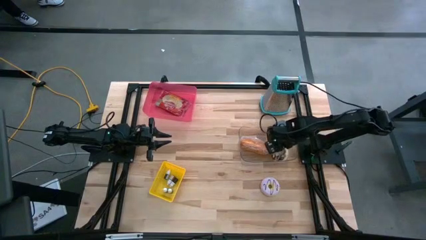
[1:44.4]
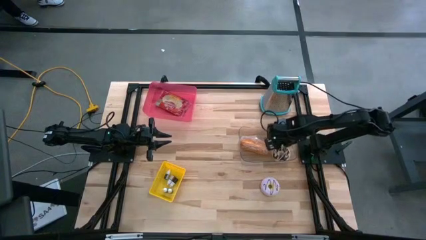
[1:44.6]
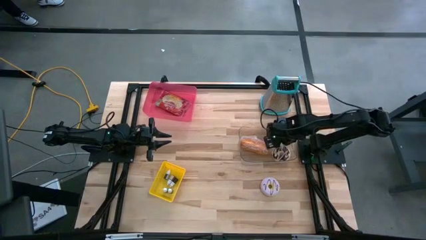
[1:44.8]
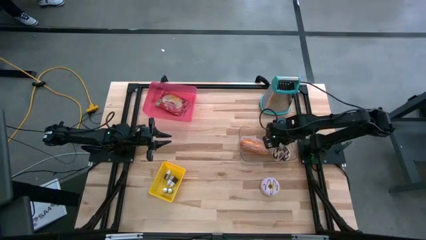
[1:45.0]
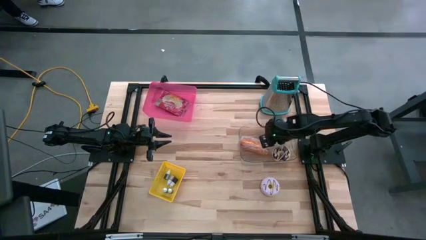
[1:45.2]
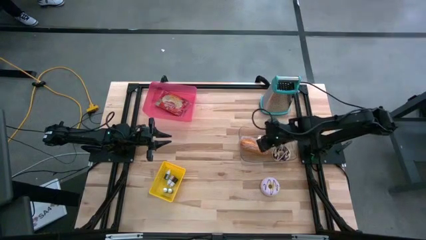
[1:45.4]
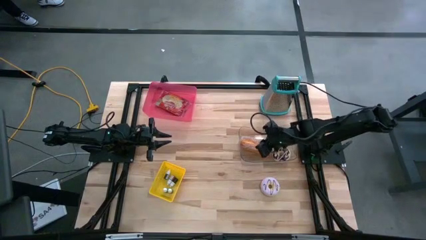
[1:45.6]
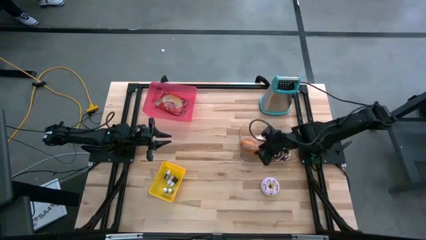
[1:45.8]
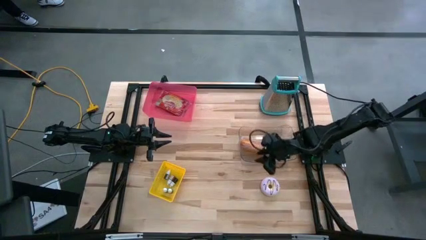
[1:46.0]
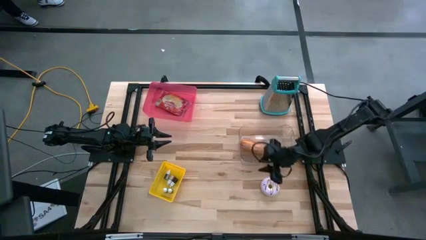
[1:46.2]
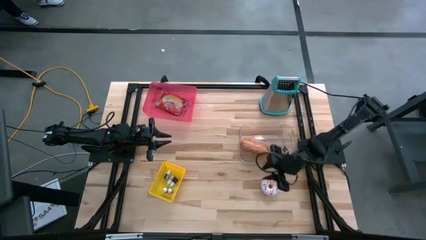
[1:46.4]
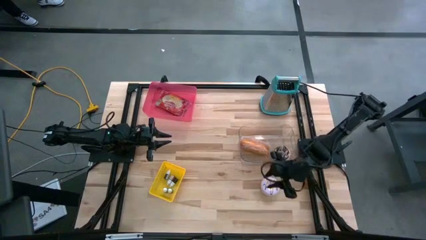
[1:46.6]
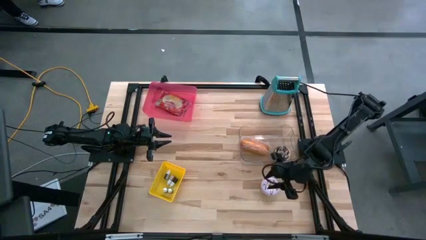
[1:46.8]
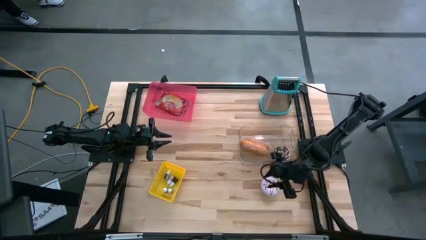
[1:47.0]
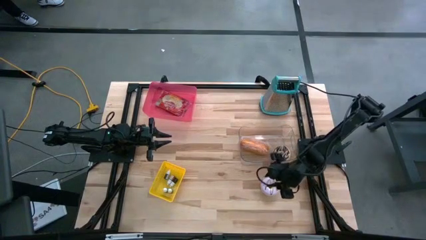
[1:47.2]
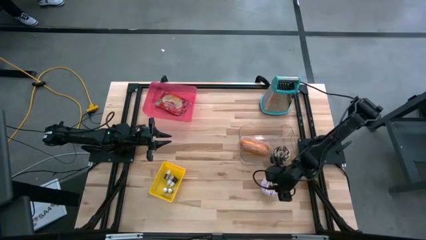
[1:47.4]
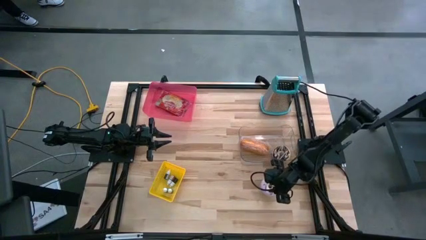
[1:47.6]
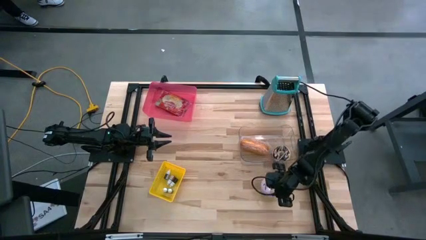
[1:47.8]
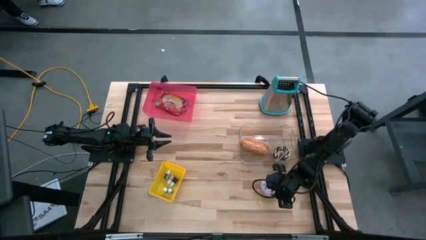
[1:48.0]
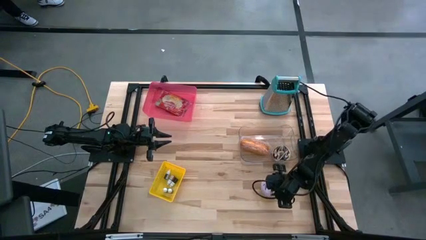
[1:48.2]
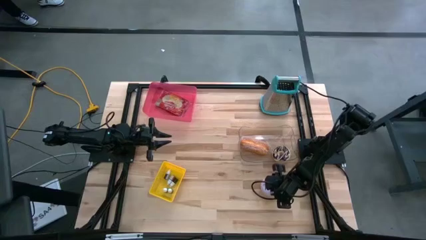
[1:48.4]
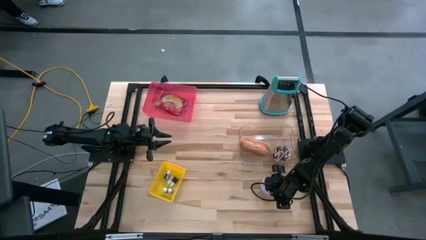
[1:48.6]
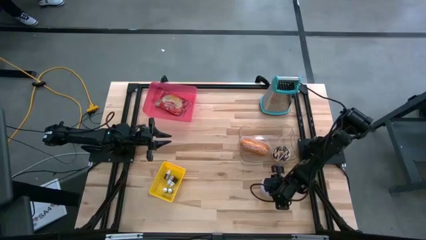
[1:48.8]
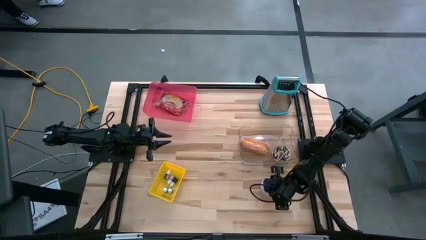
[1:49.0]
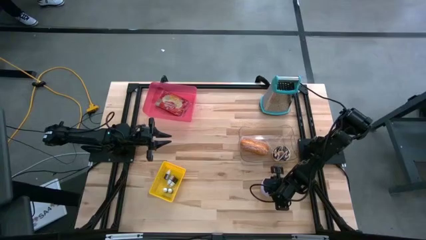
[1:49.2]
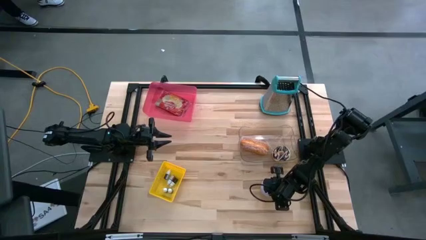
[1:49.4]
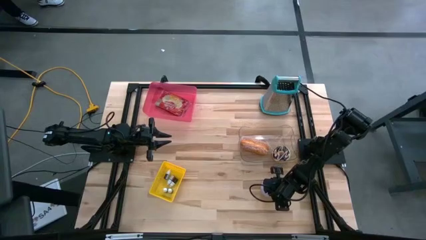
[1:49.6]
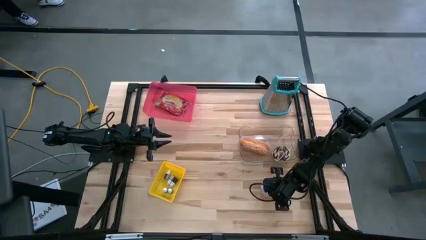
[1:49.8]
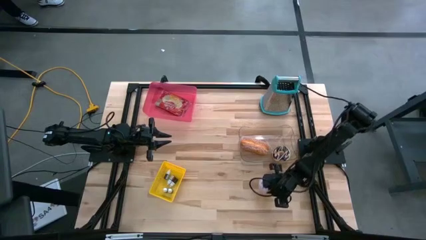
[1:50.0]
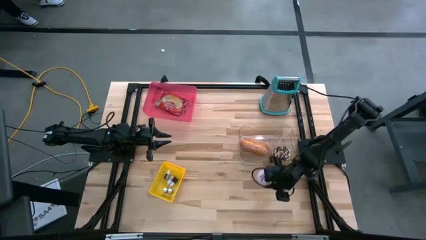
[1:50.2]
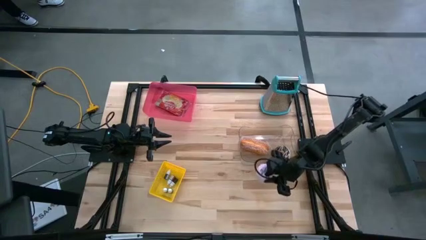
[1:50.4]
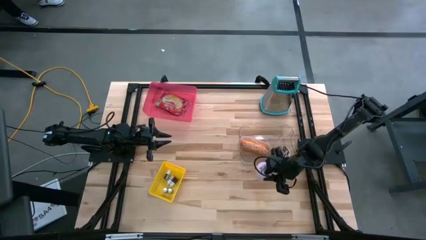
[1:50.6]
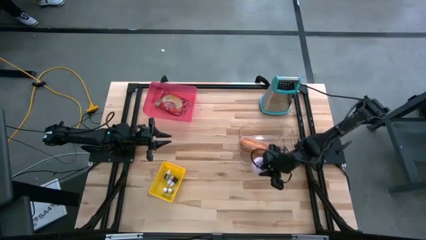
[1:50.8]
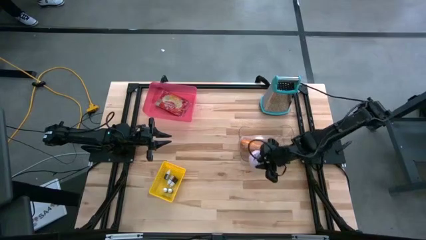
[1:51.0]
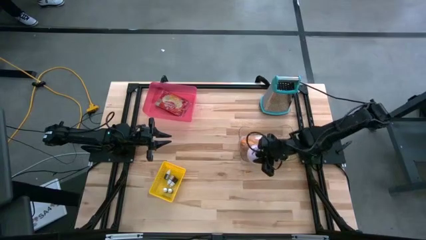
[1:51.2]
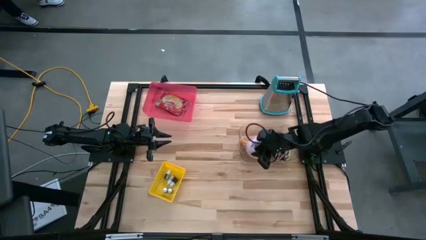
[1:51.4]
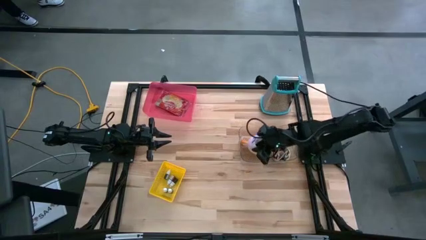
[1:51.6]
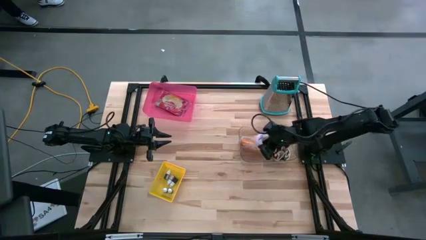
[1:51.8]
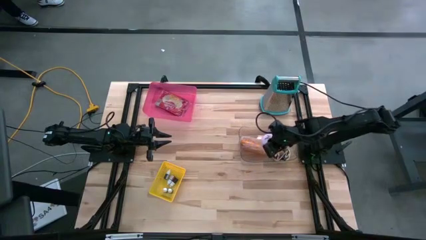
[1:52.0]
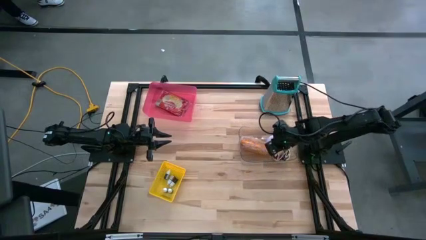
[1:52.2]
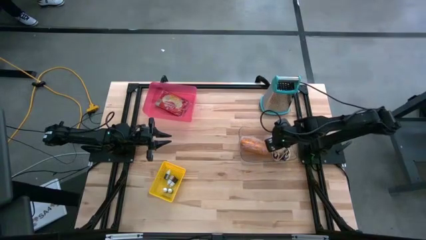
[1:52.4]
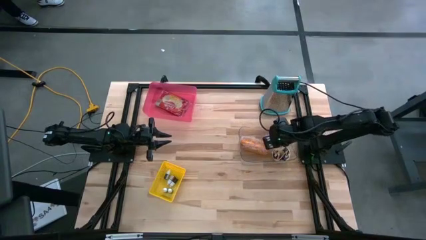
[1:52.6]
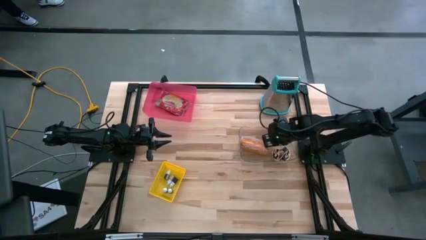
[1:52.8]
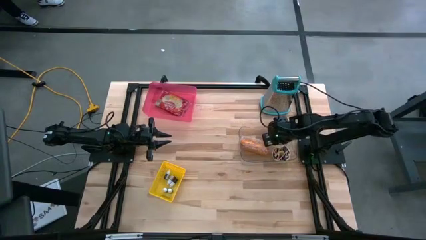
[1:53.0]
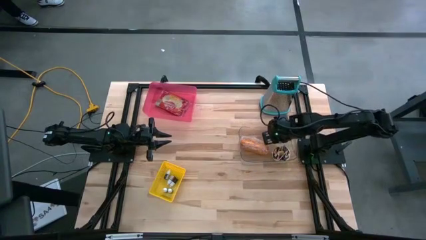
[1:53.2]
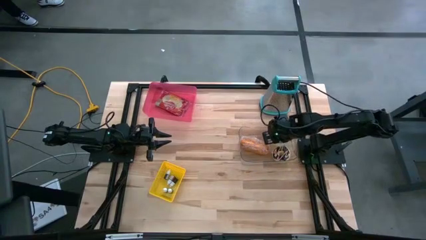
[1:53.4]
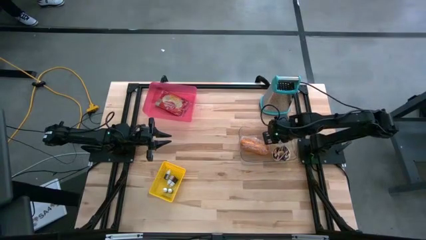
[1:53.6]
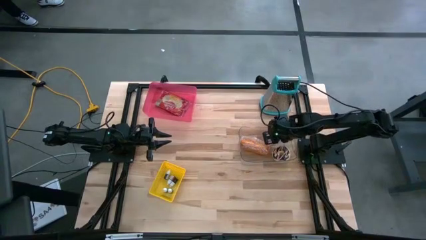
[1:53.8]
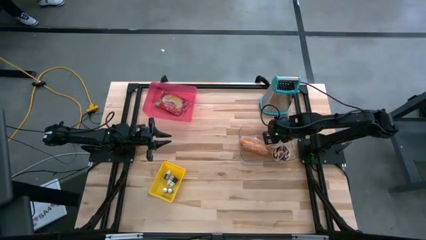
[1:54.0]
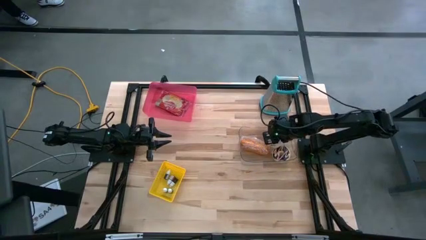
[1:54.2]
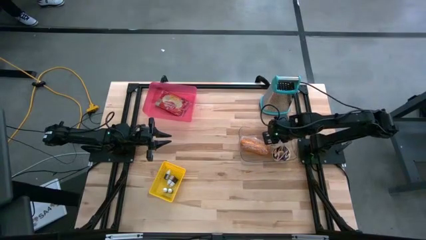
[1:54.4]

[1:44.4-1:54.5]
Put the violet donut into the transparent bin
